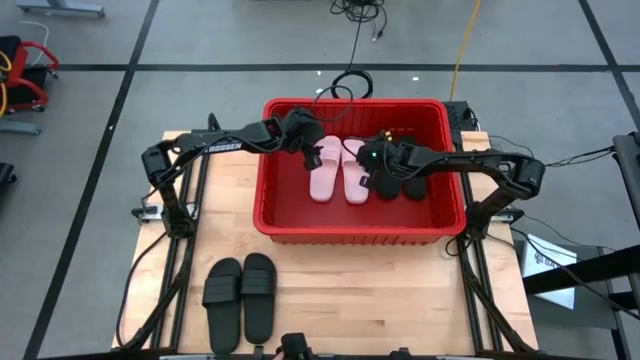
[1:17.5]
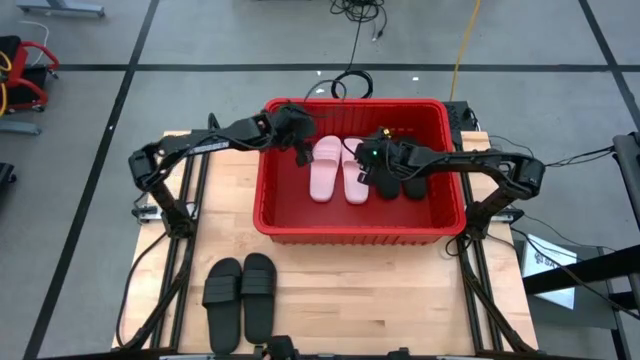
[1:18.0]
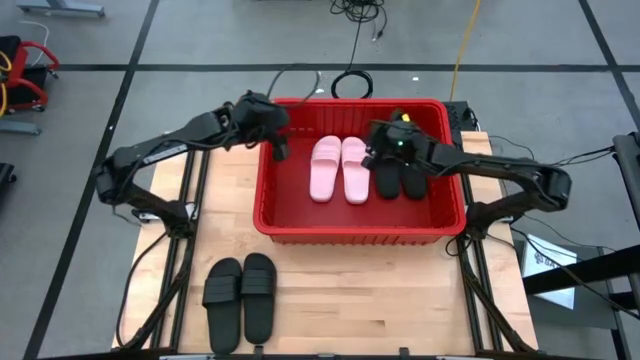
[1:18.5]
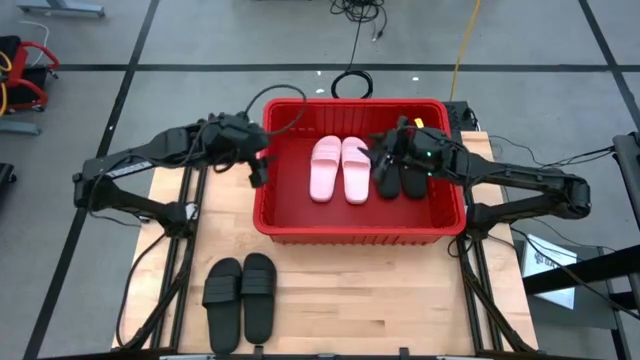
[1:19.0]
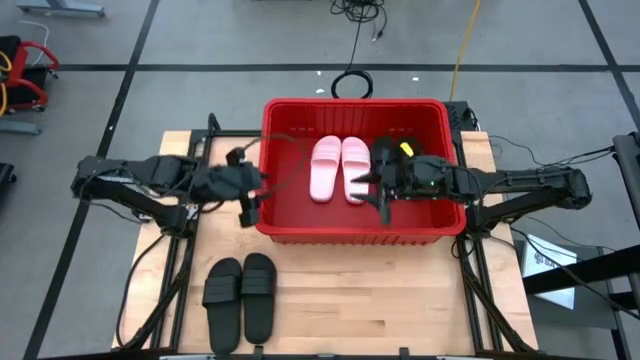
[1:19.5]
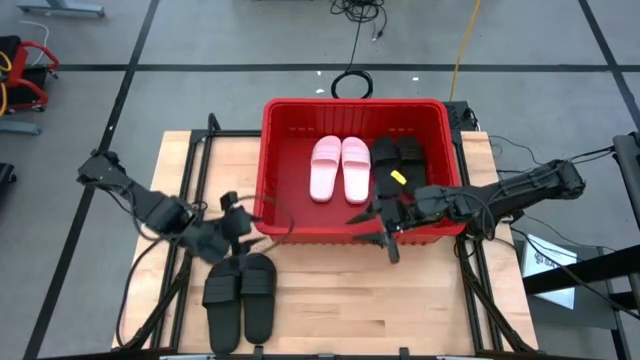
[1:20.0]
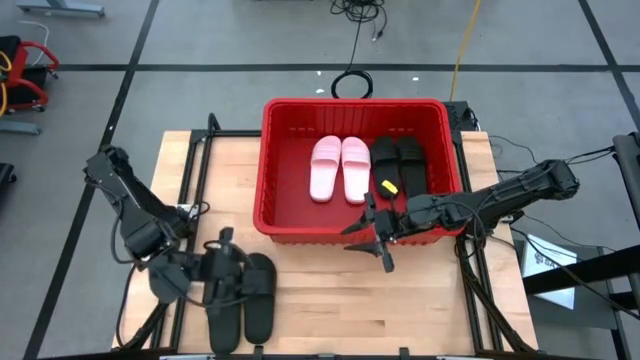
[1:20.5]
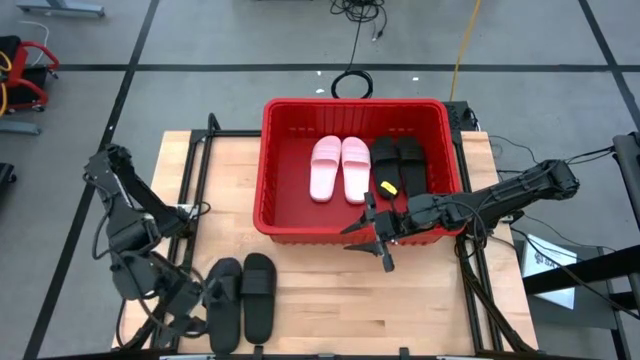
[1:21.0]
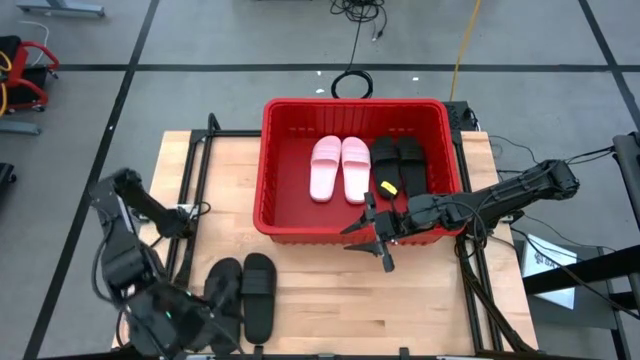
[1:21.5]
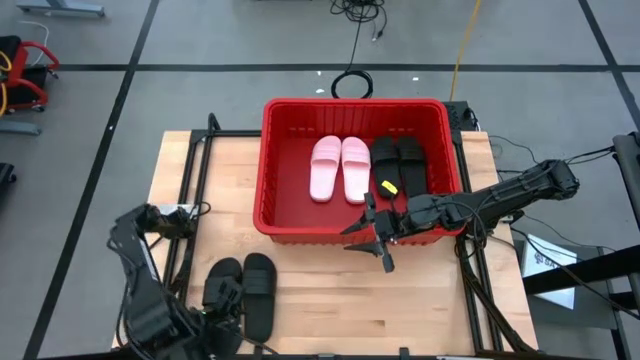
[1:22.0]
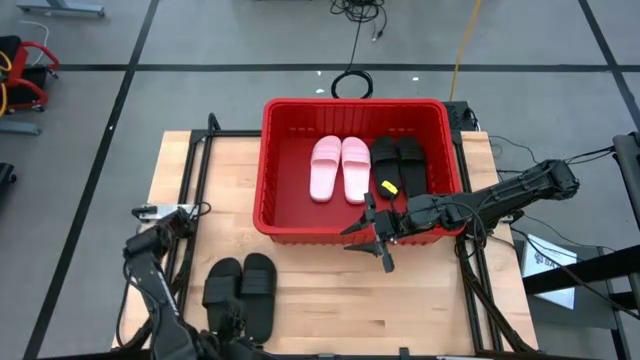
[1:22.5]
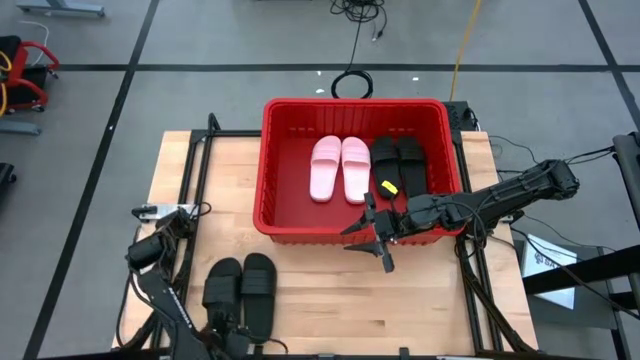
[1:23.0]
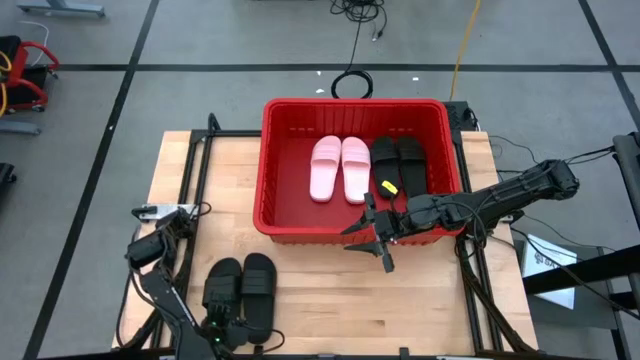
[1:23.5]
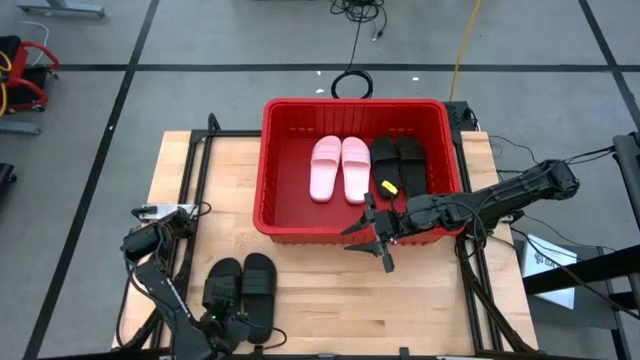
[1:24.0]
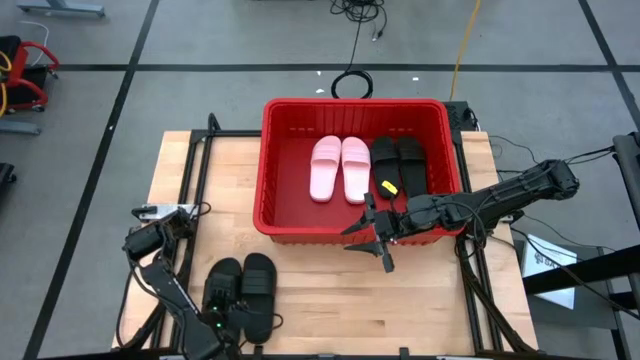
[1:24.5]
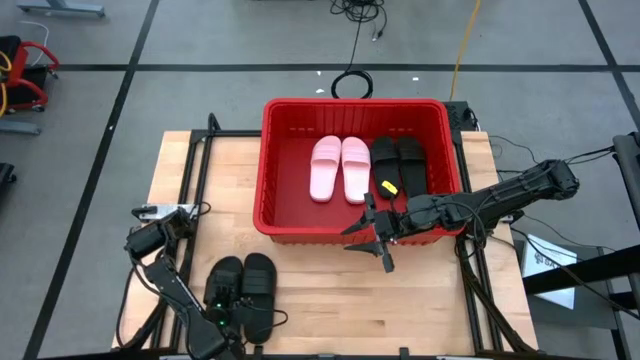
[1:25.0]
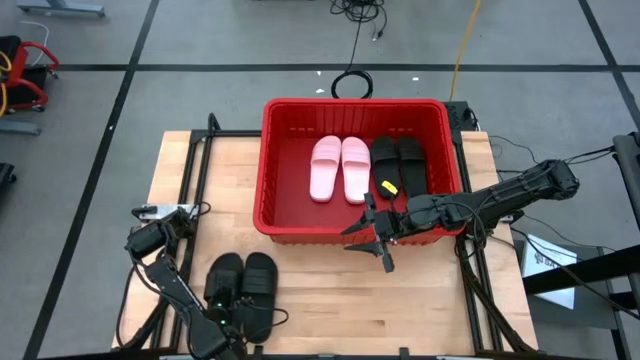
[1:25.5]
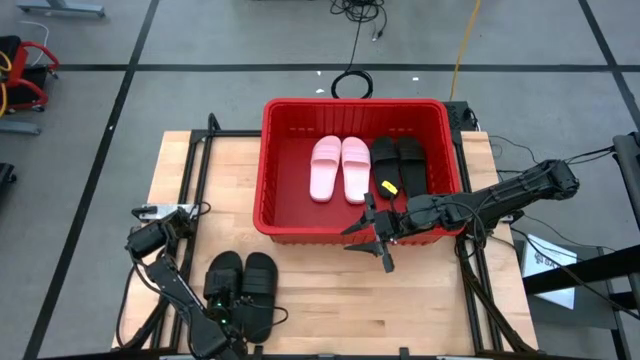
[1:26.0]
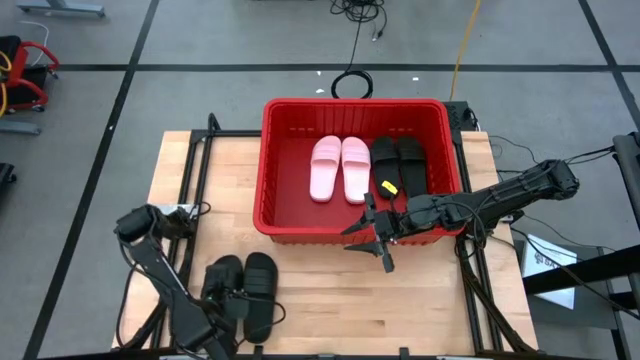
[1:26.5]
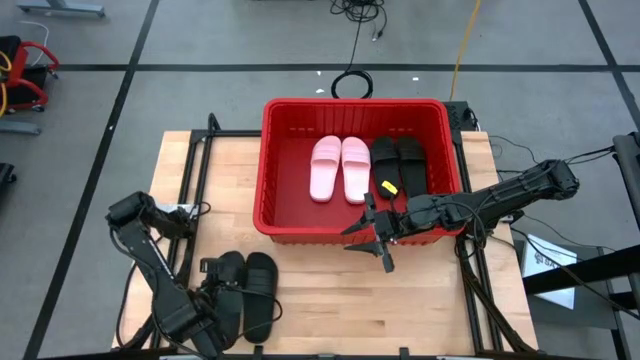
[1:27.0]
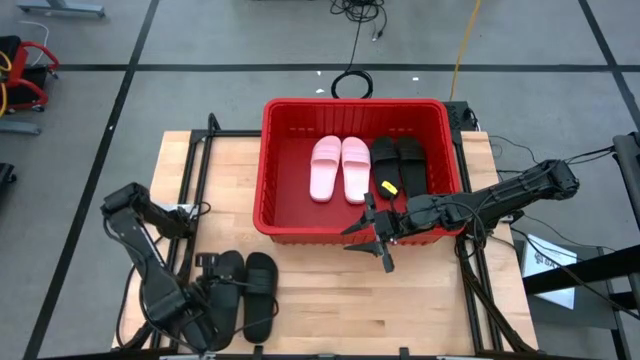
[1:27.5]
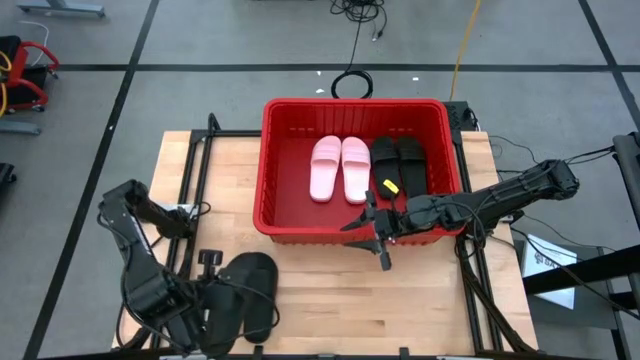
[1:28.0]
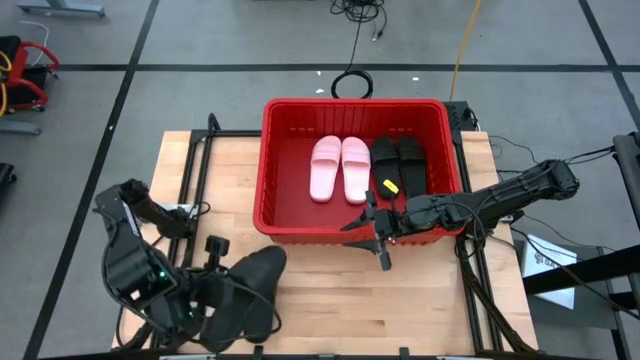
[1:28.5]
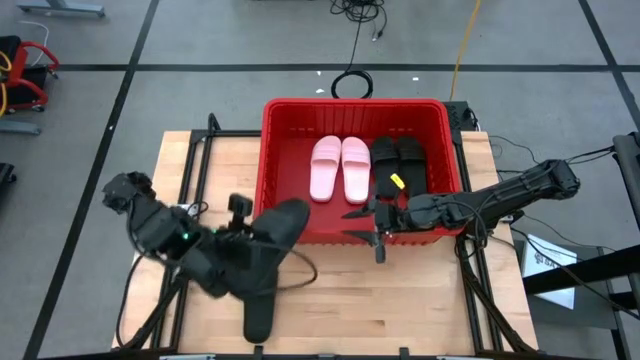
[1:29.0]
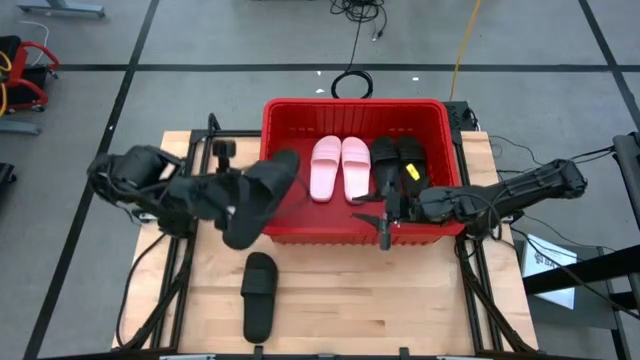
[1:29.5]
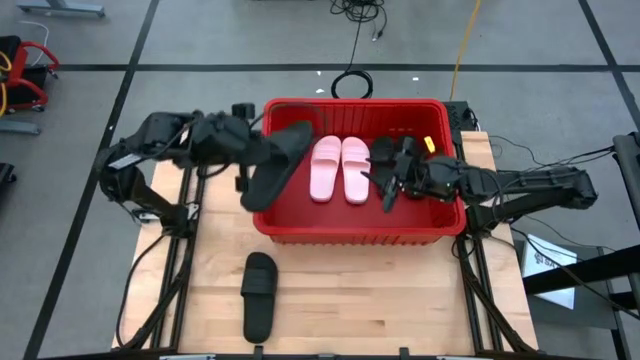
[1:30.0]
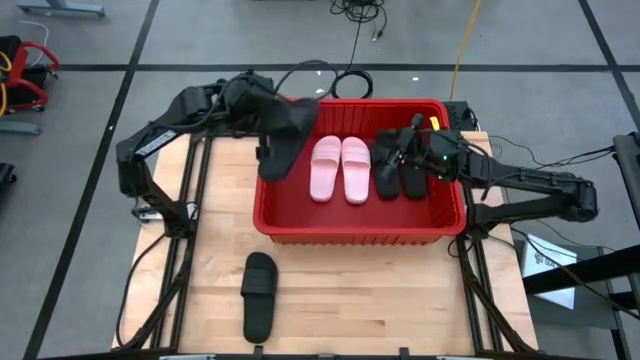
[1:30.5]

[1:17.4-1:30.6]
Task: Pick and place slides into bin
Put the black slide into the red bin

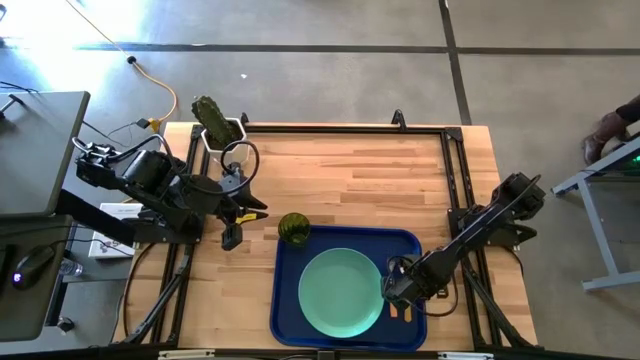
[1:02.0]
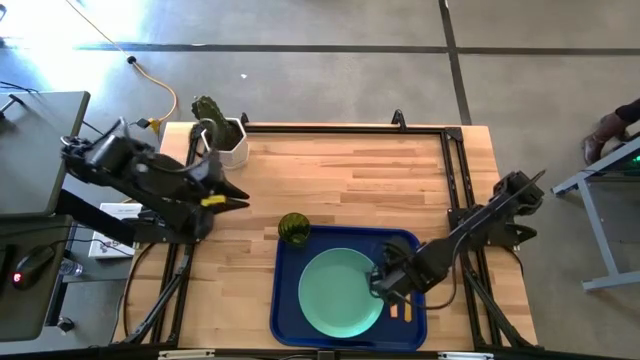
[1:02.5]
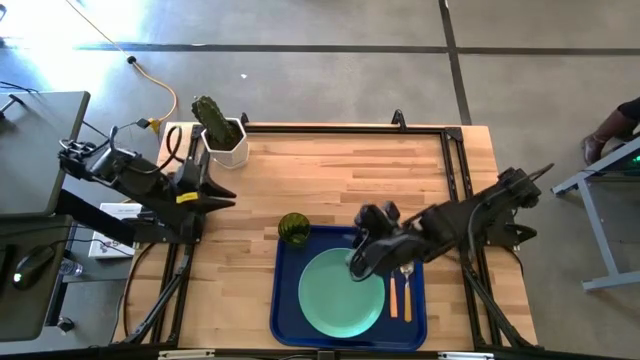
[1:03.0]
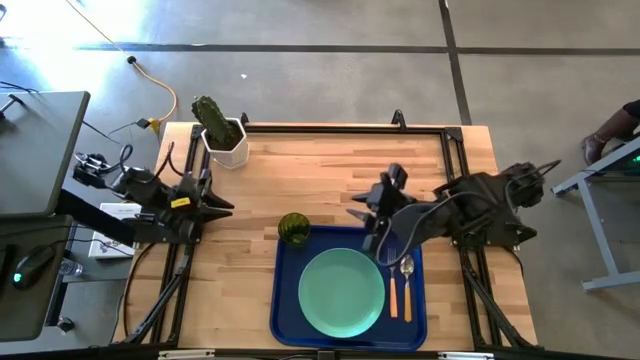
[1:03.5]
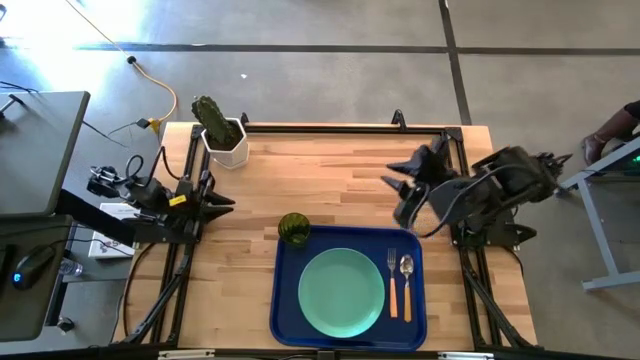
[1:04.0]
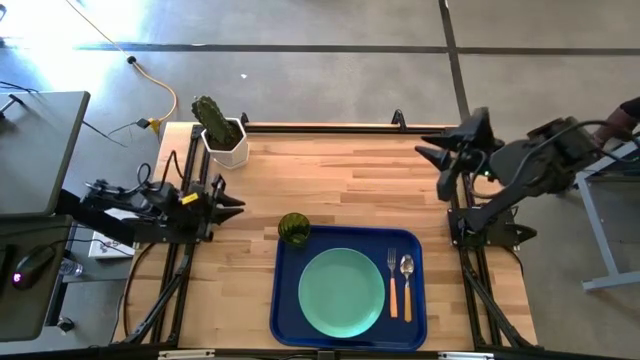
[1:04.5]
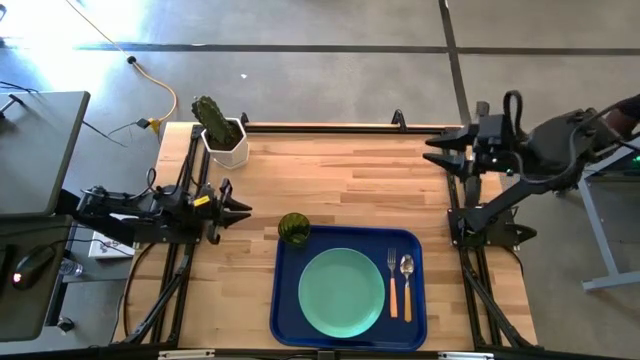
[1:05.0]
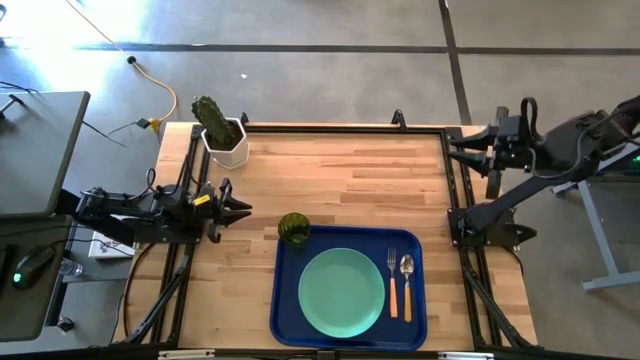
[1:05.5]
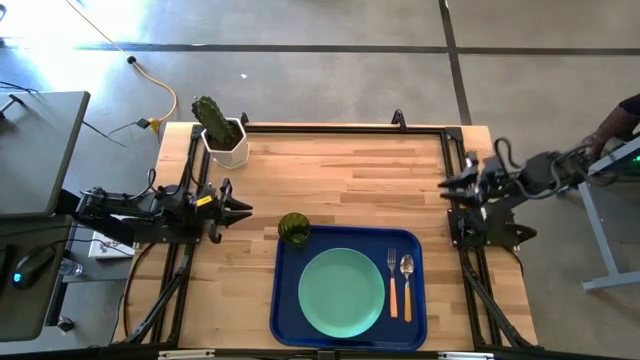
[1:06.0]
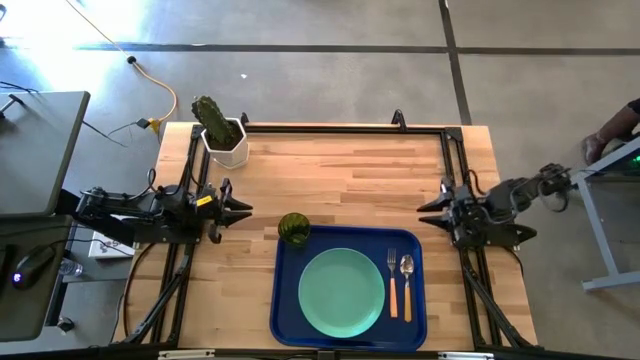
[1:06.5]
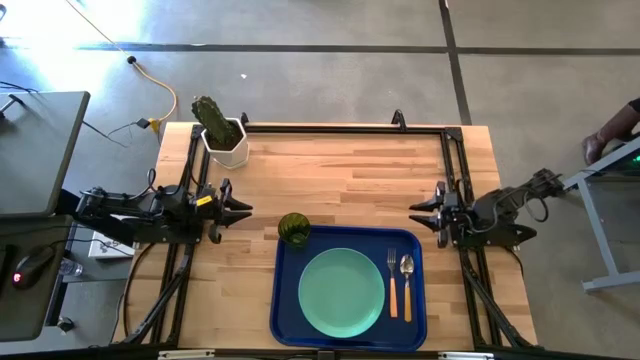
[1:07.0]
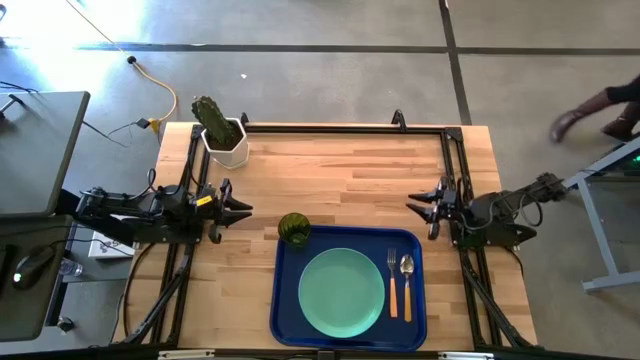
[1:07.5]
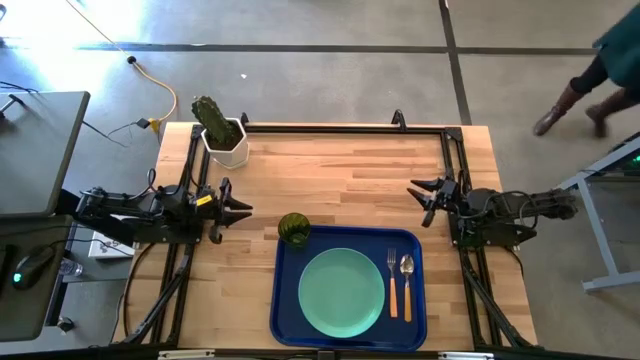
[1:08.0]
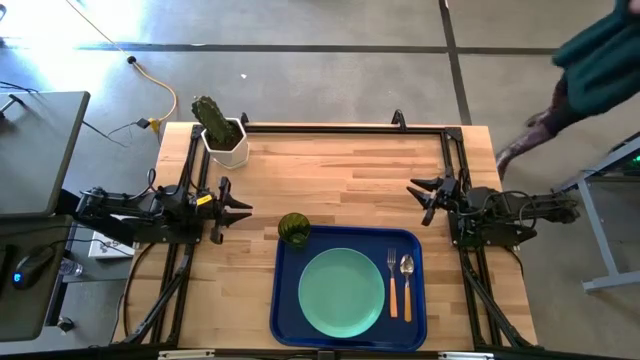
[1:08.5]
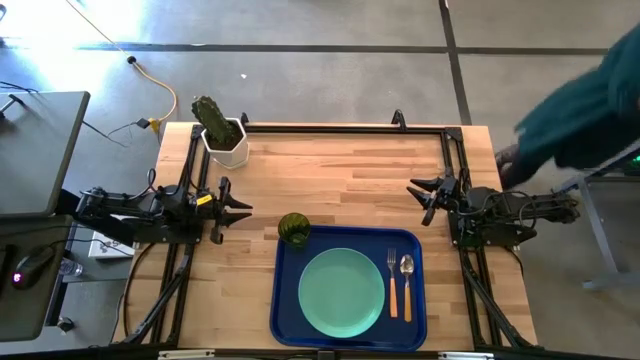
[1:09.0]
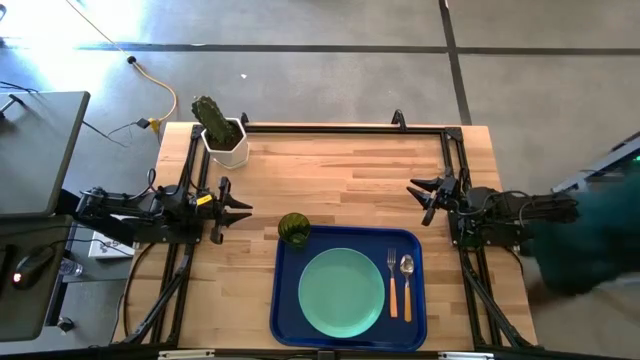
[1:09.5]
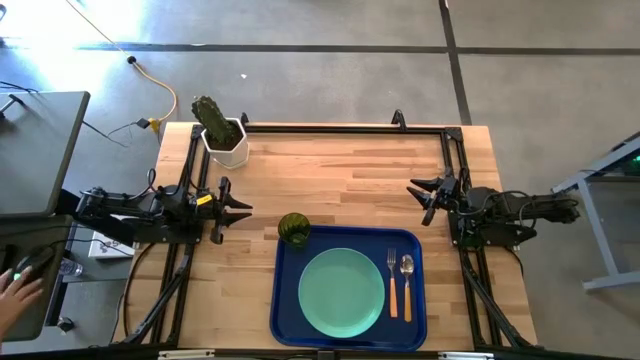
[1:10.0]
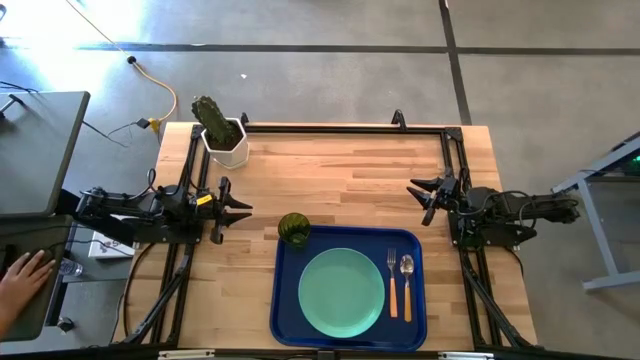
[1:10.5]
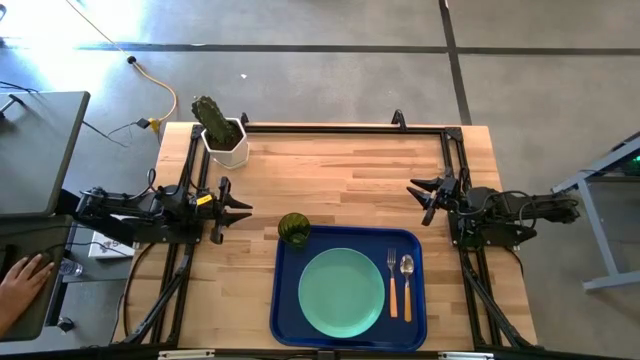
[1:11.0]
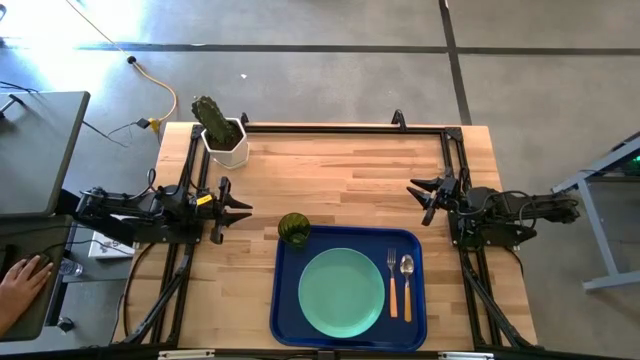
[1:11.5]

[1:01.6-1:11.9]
Task: Pick and place plate/cup/fork/spoon on tray
Return to Home Position
